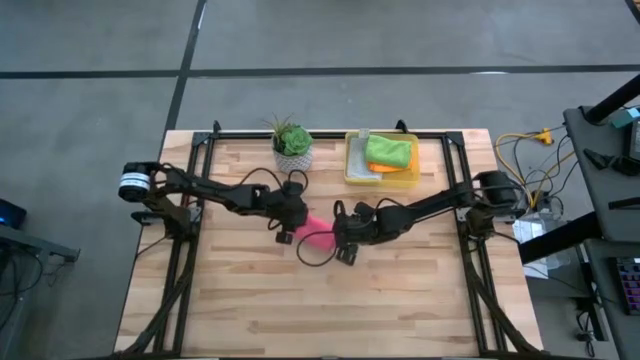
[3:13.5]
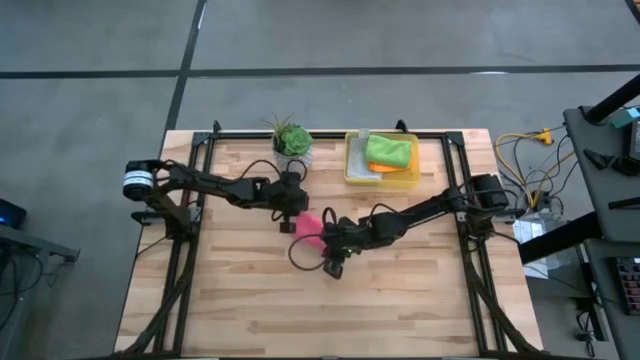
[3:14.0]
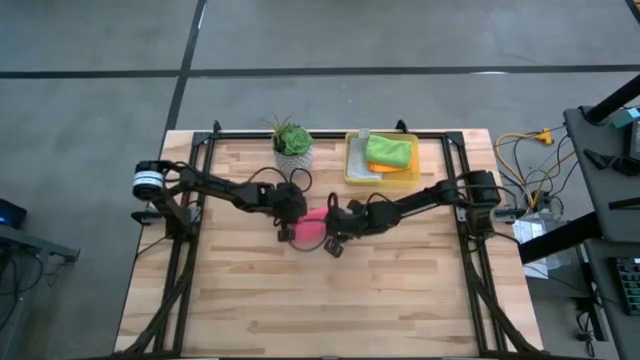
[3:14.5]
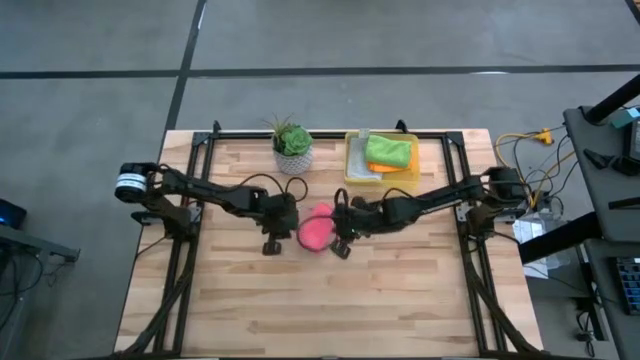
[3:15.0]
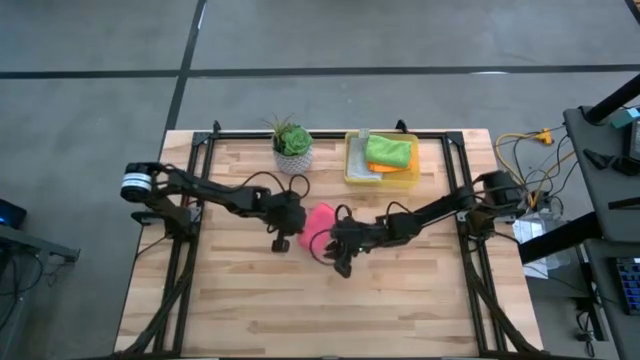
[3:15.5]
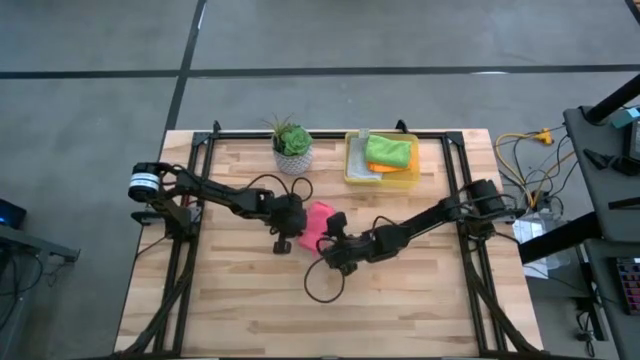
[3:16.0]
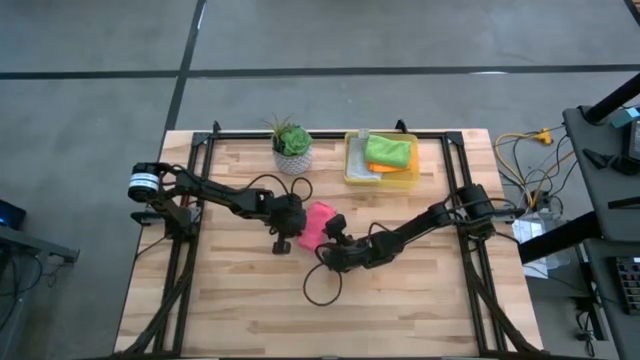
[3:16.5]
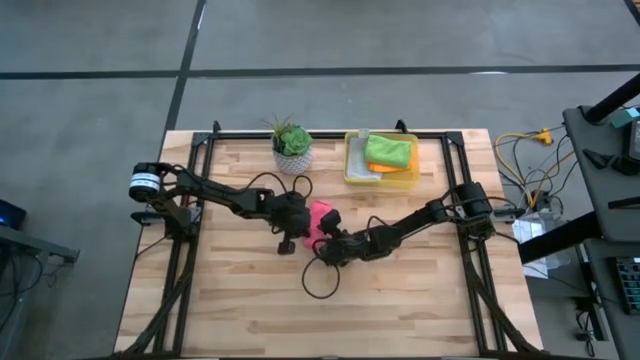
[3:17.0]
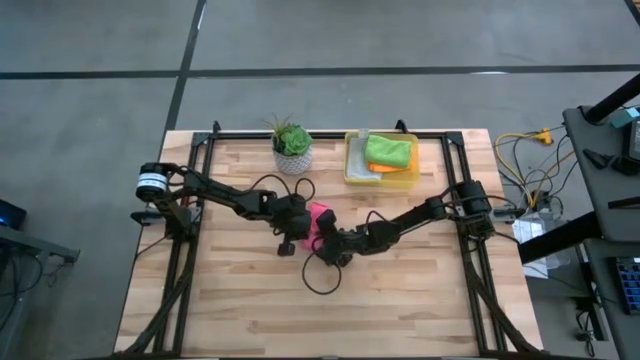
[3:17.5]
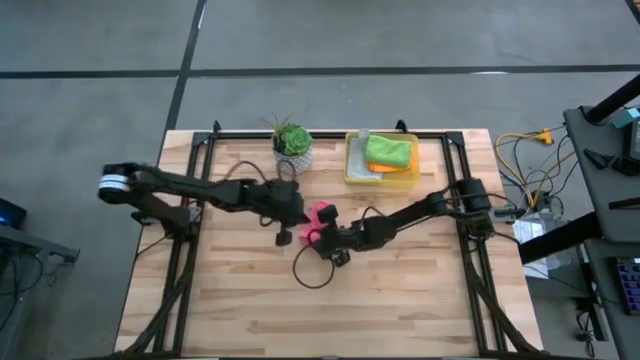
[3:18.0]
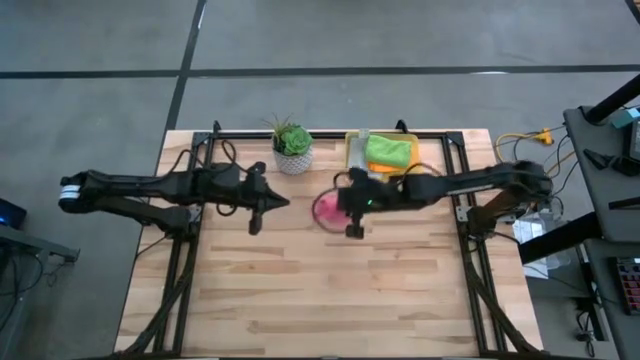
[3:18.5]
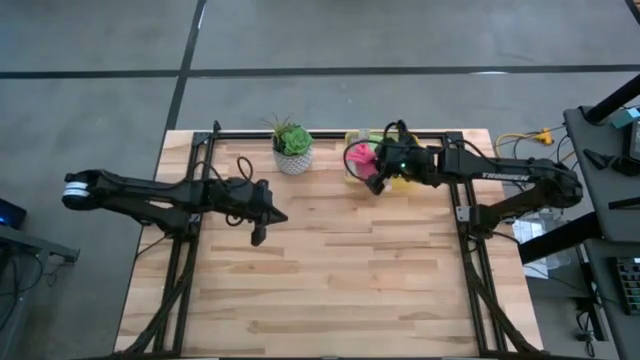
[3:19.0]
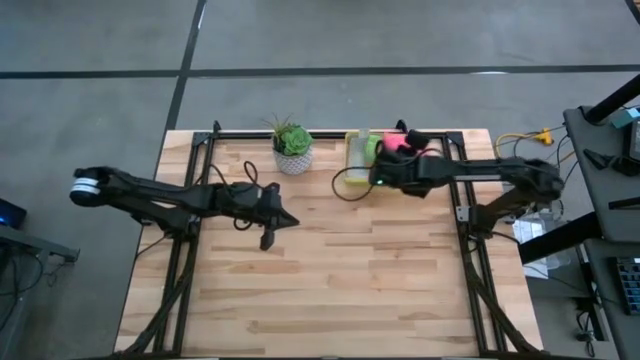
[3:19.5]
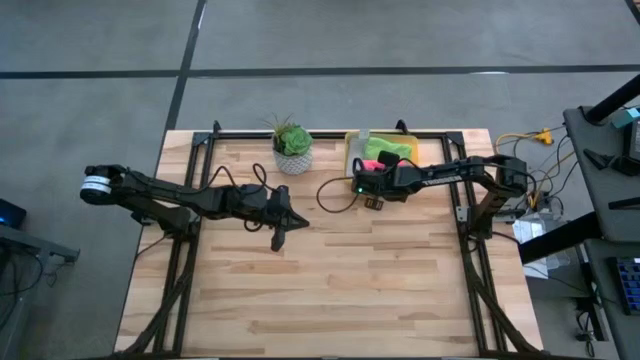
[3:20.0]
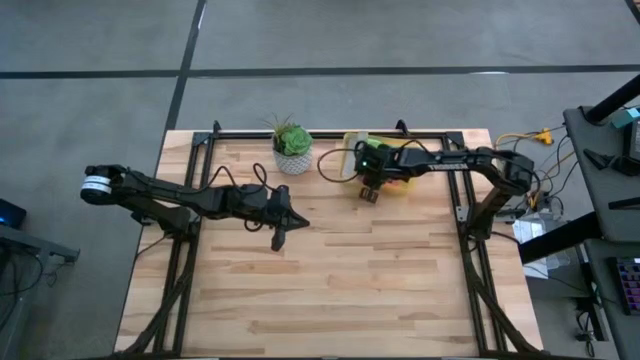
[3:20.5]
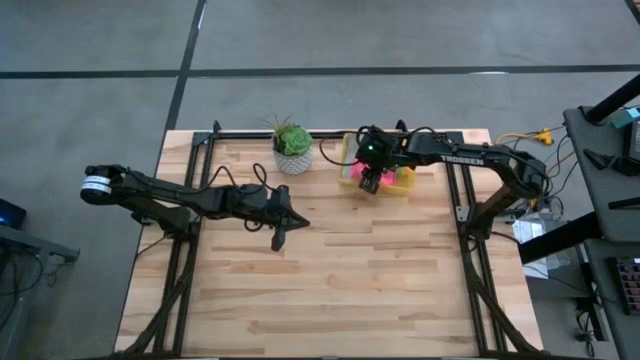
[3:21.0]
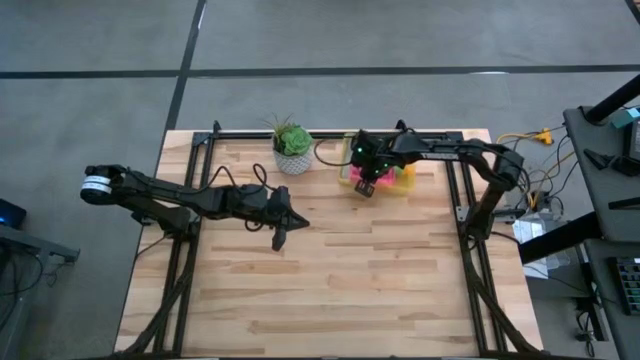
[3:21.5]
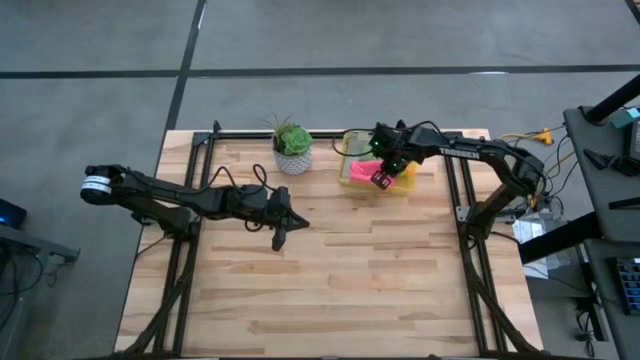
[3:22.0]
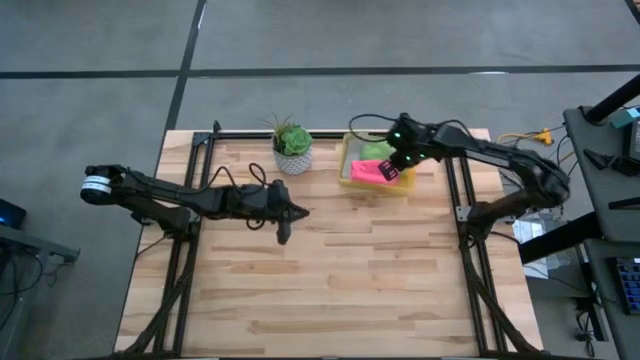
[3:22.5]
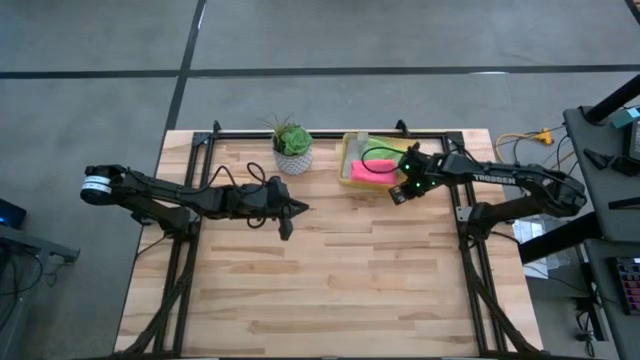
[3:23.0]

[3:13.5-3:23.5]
Task: Fold microfiber towels
Put the pink microfiber cloth into the yellow bin

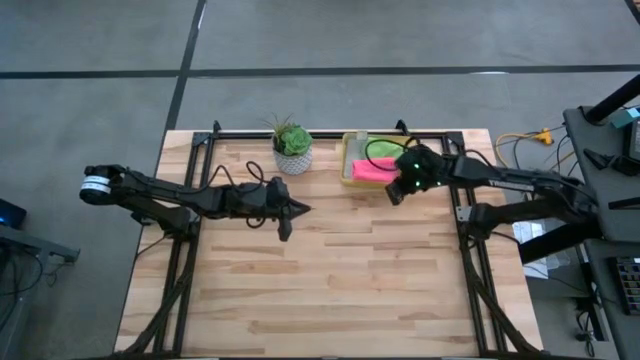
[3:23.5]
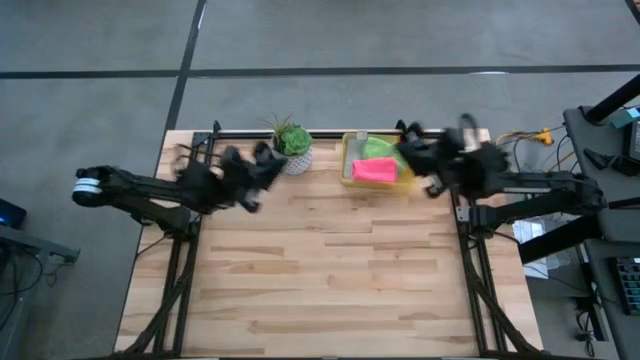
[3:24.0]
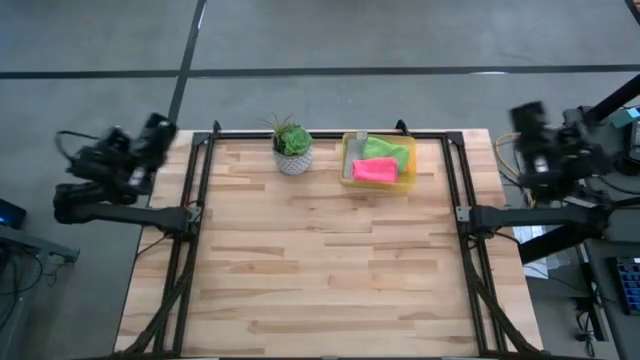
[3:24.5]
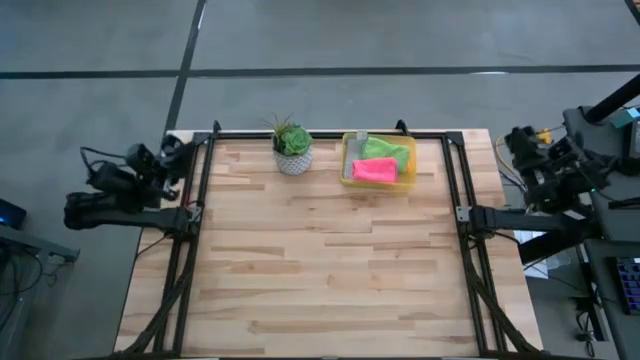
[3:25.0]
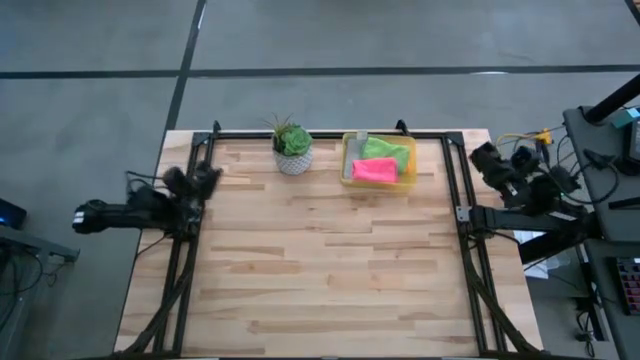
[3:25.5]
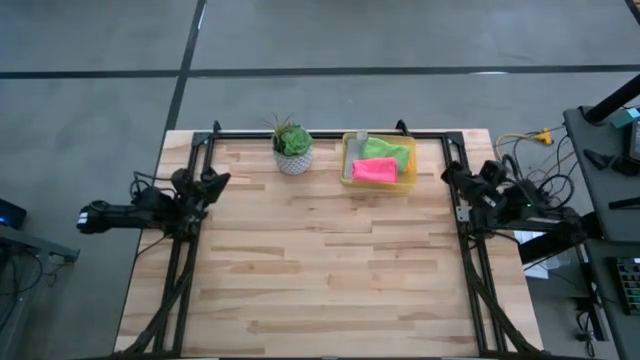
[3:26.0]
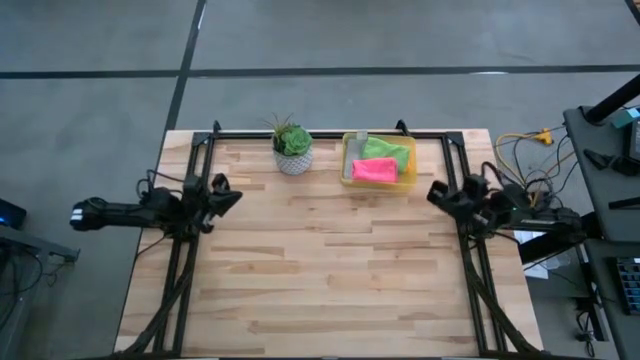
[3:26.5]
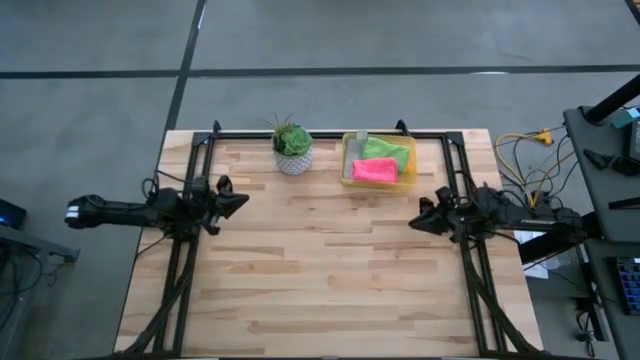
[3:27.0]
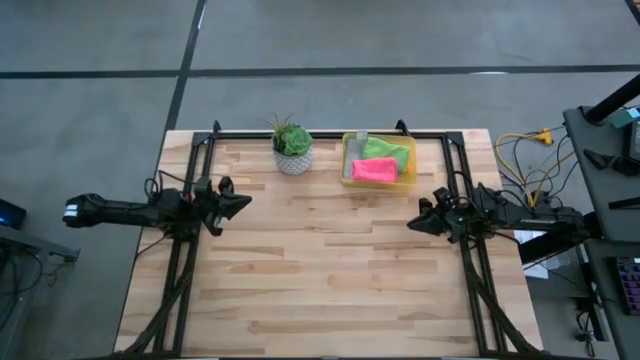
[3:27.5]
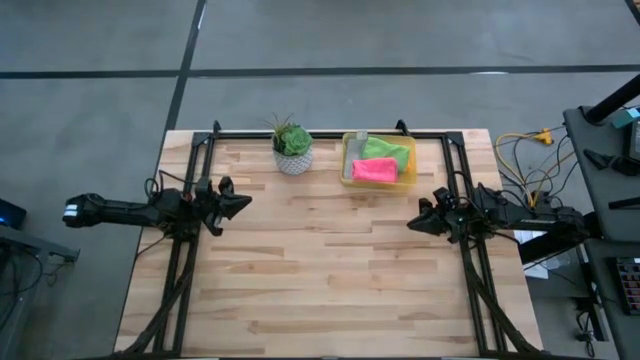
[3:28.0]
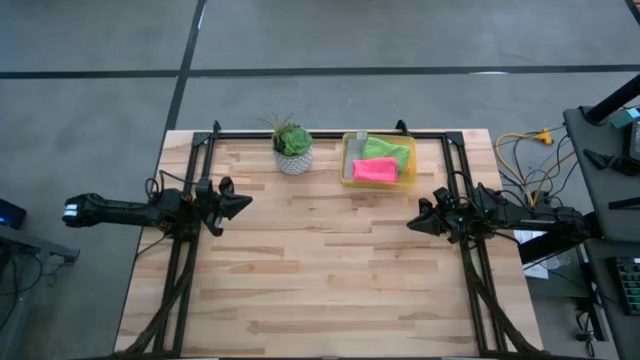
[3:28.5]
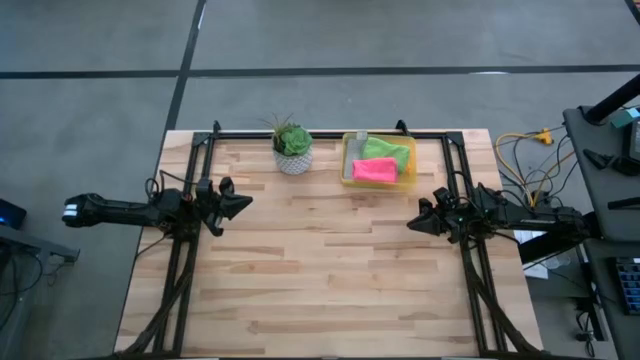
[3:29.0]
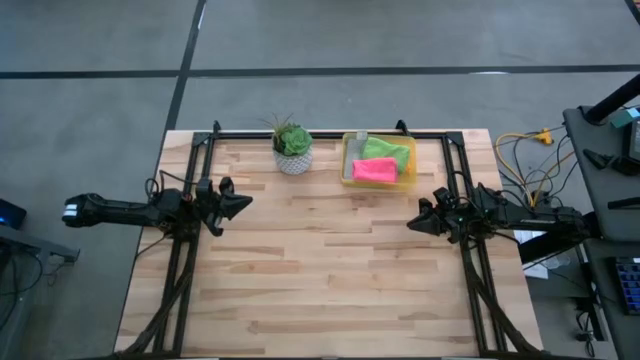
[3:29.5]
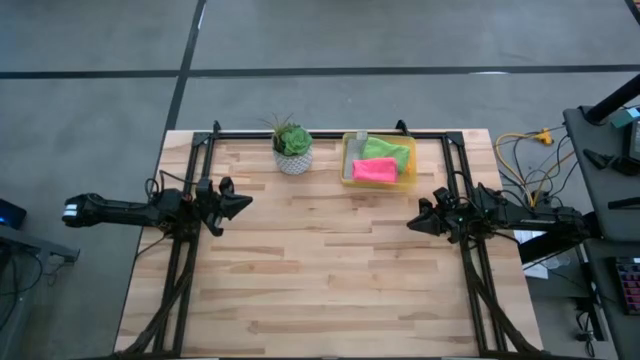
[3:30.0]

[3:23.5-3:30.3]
Return to Home Position

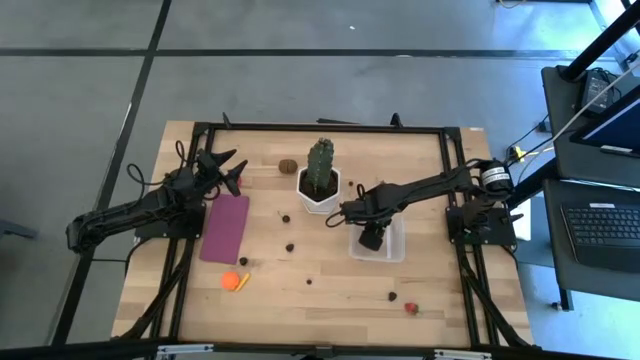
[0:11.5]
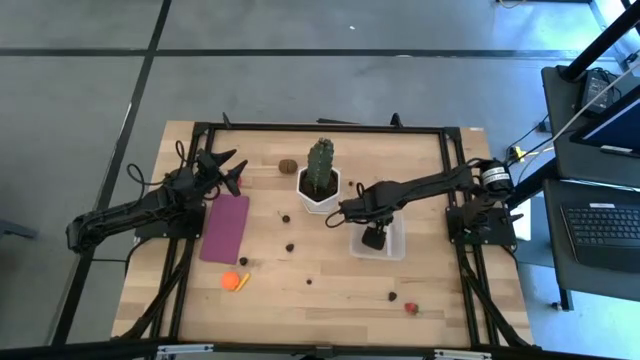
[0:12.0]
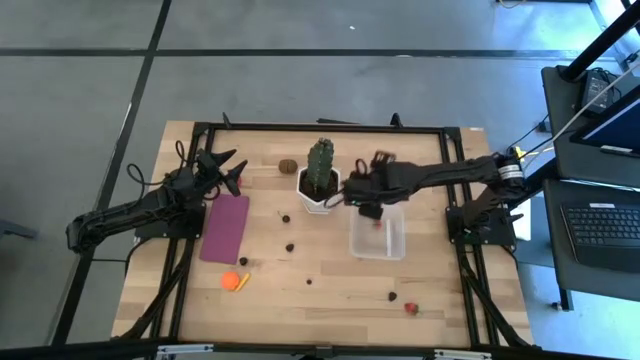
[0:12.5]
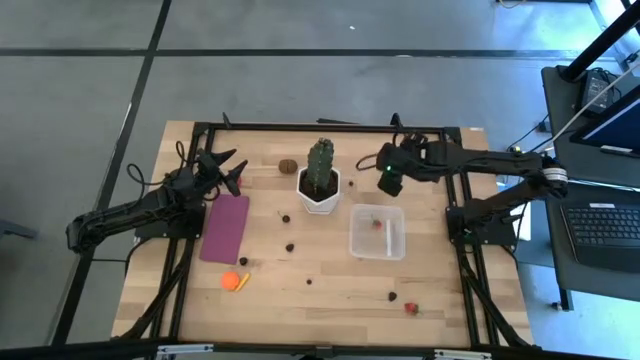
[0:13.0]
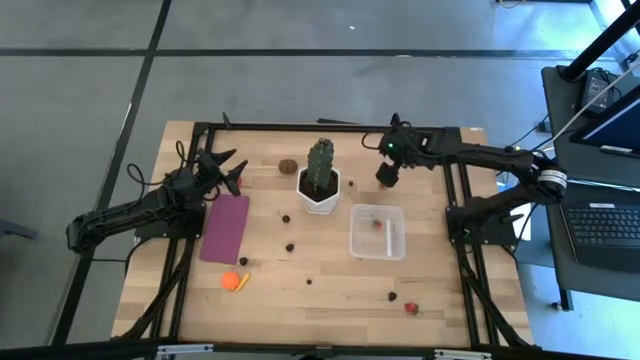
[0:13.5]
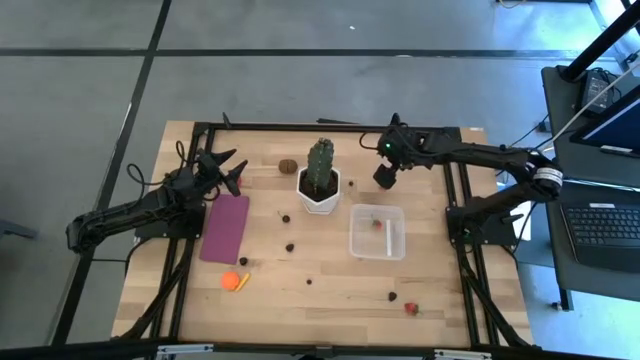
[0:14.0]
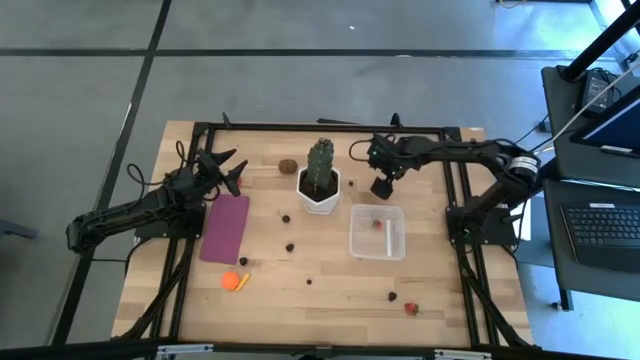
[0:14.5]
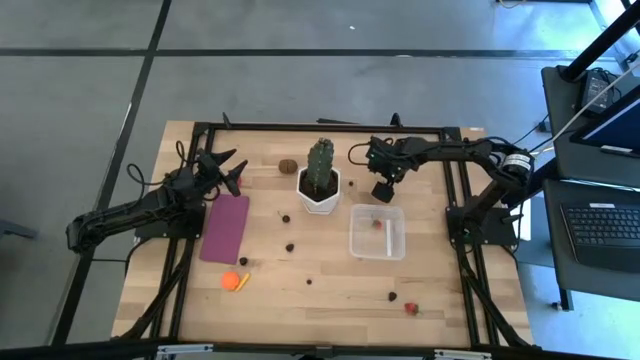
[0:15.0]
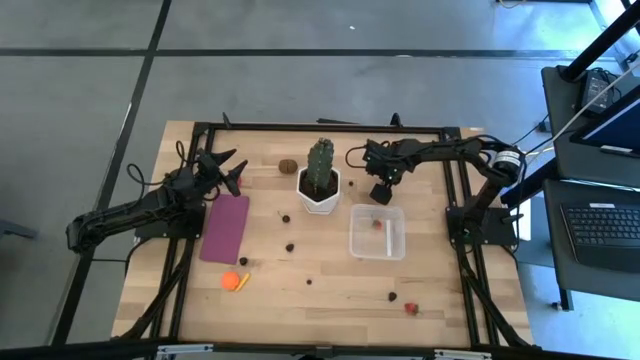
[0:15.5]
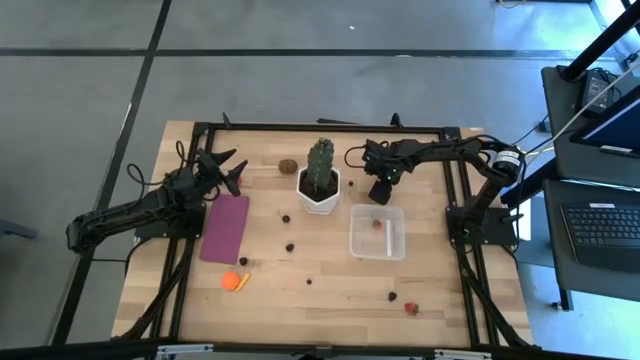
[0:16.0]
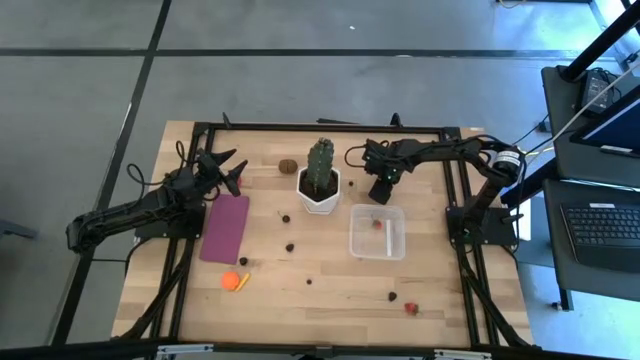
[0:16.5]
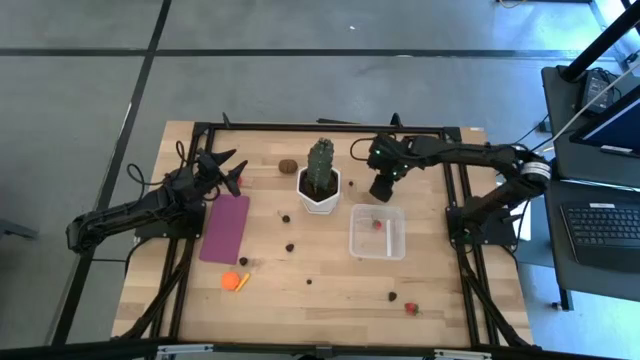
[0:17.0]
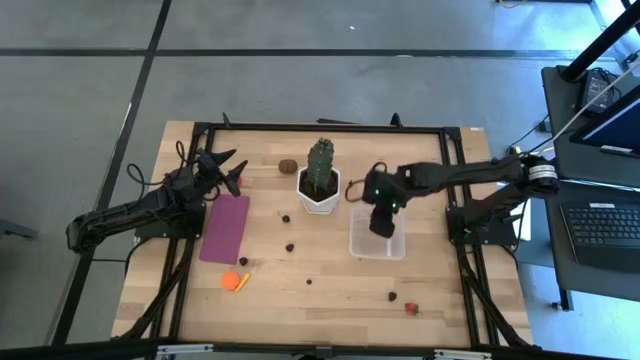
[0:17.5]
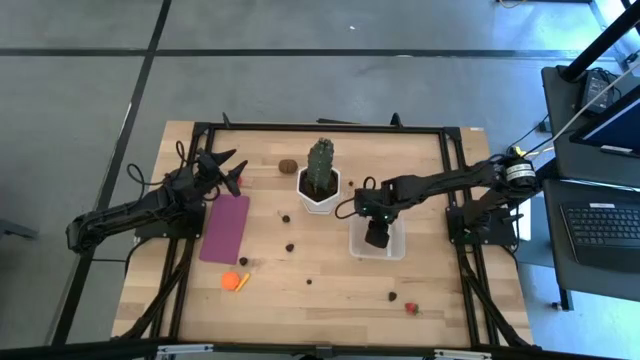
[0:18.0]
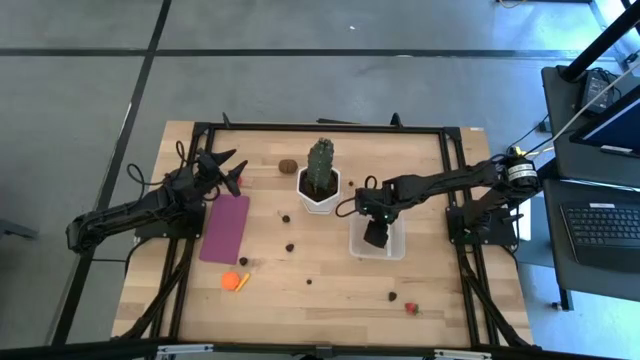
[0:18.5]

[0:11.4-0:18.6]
Task: Pick and placing Produce into tupperware
Put the strawberry into the transparent bin
